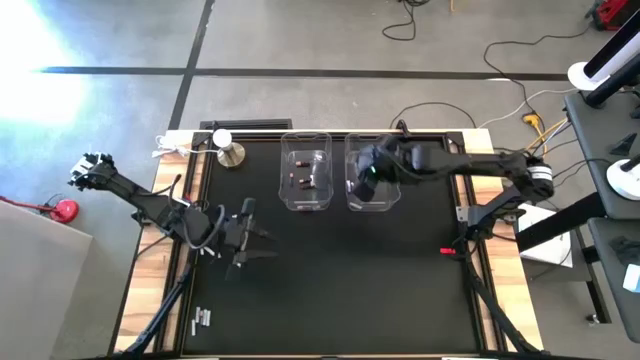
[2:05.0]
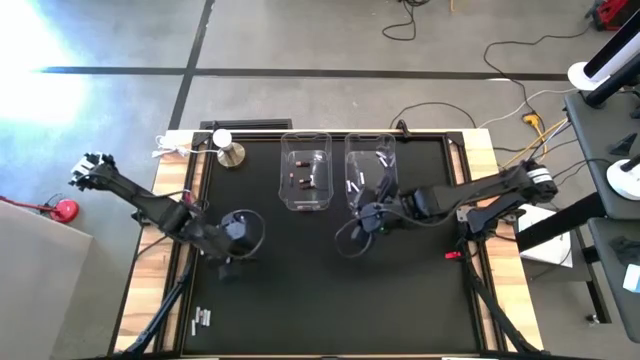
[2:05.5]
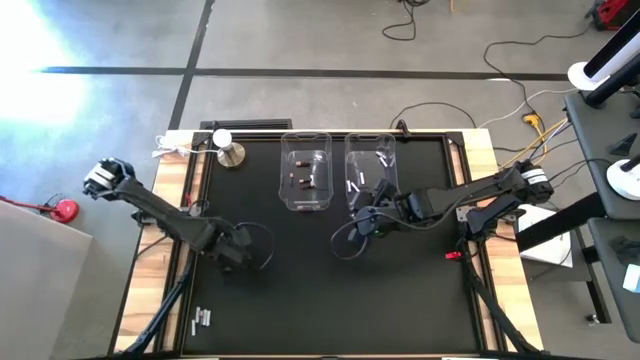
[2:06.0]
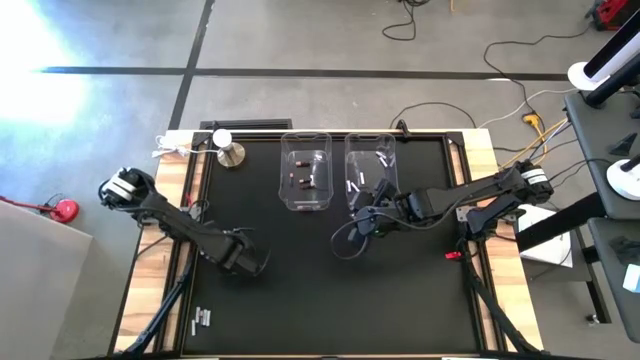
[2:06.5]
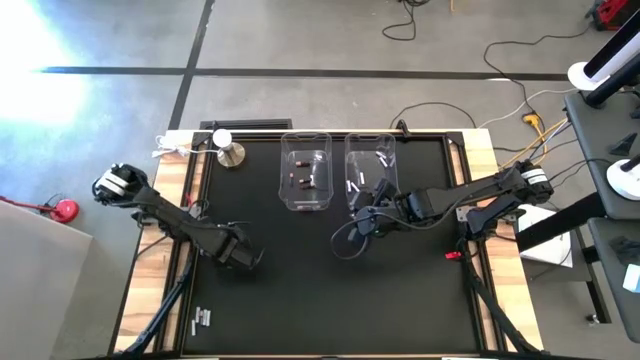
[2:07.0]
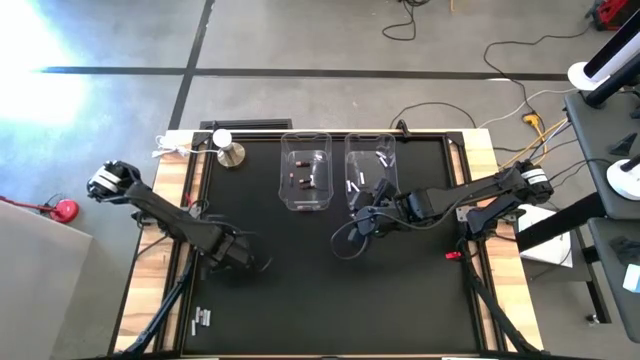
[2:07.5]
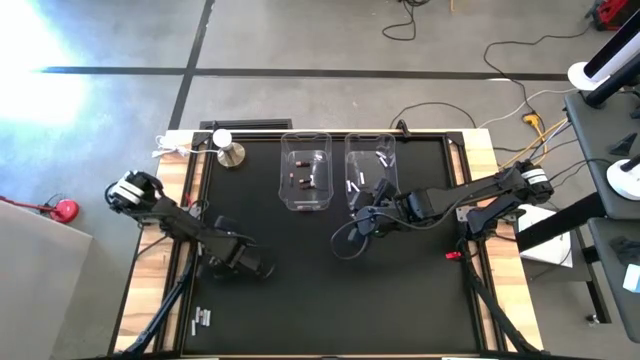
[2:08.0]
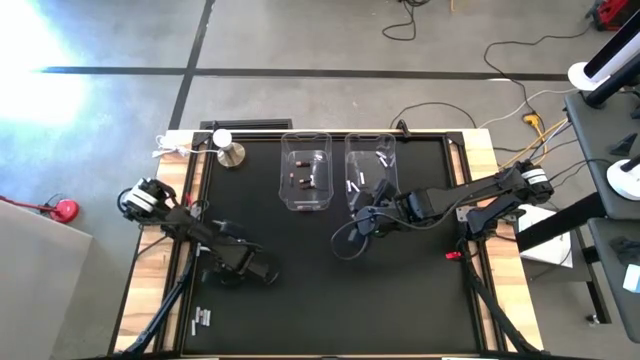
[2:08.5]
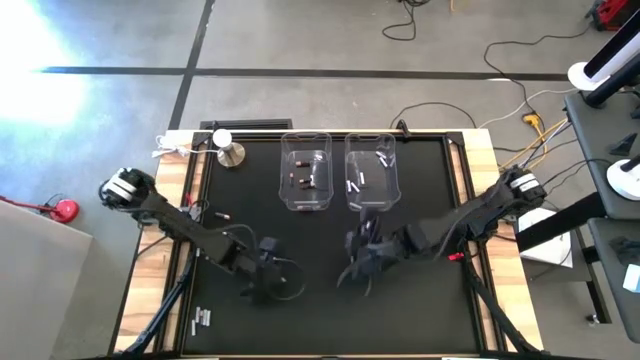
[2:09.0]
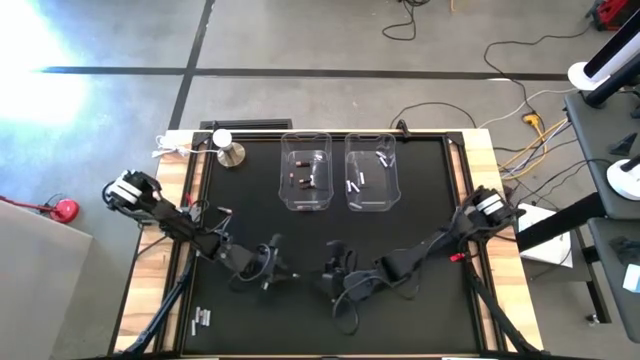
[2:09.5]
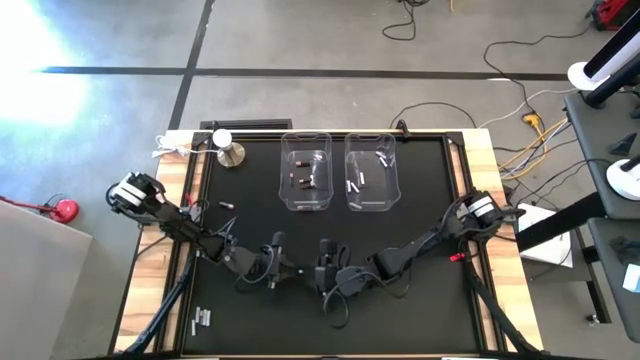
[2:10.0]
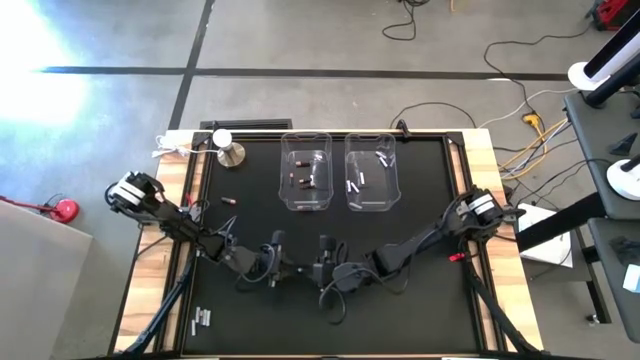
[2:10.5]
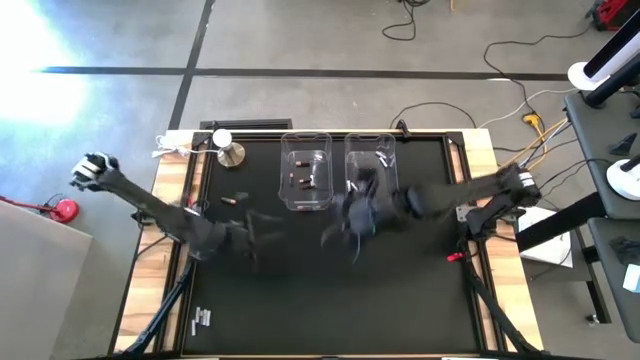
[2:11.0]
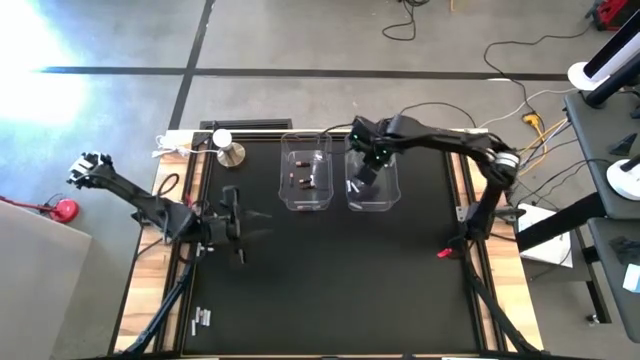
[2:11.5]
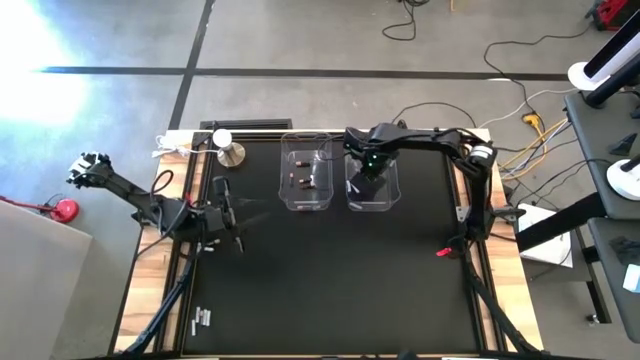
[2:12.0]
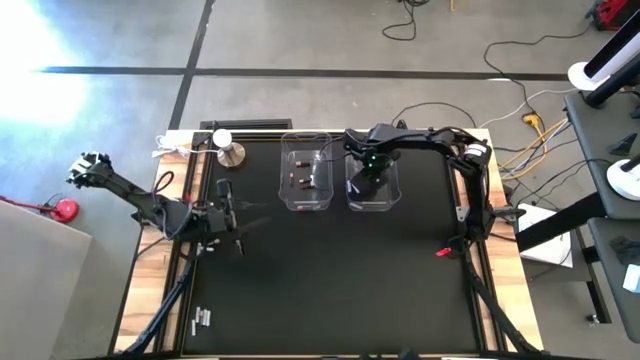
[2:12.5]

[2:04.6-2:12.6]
Task: Sort batteries
Put the white battery into the right transparent bin

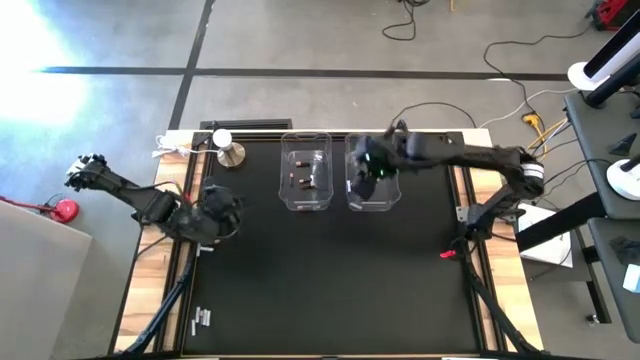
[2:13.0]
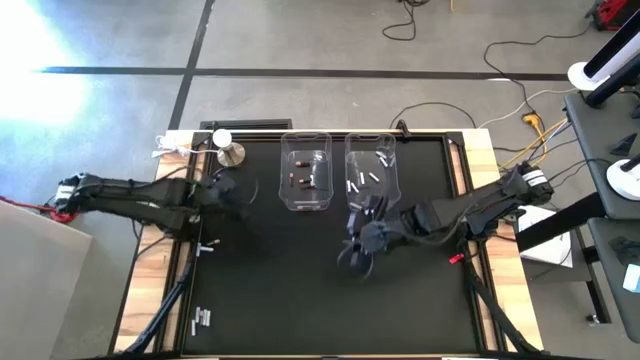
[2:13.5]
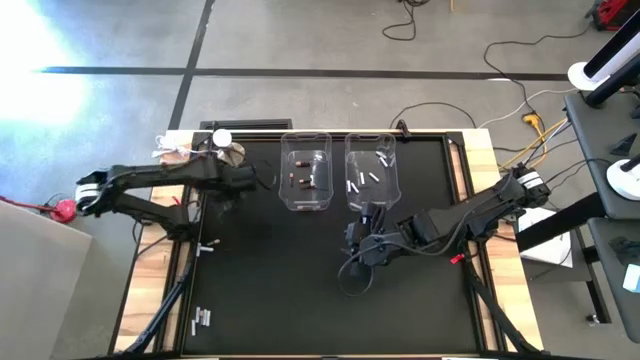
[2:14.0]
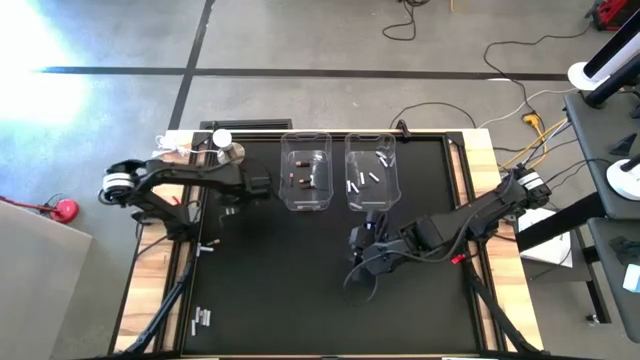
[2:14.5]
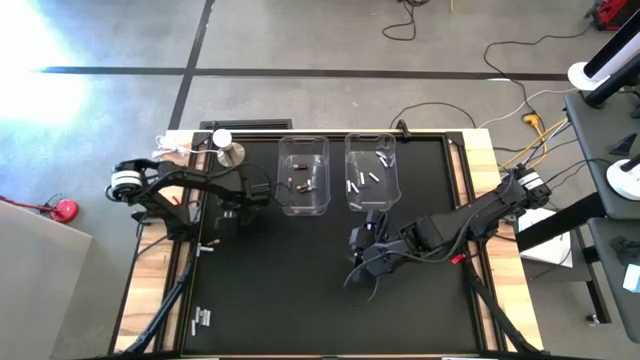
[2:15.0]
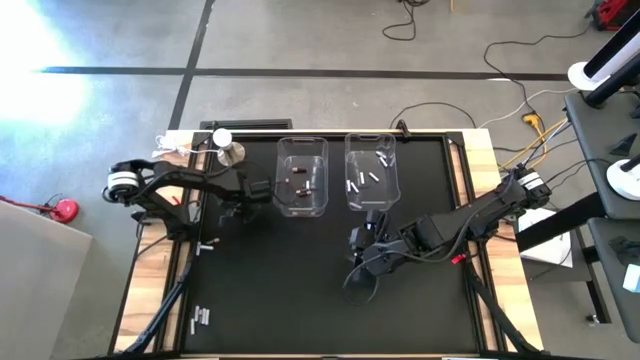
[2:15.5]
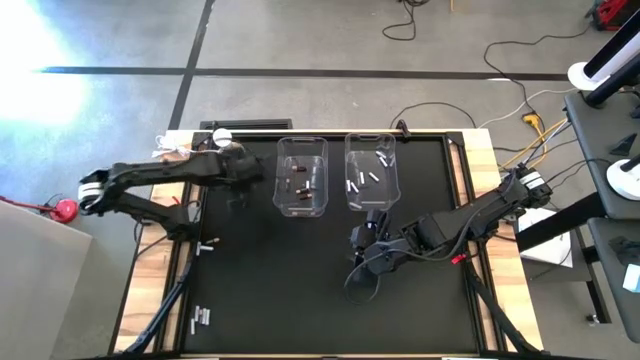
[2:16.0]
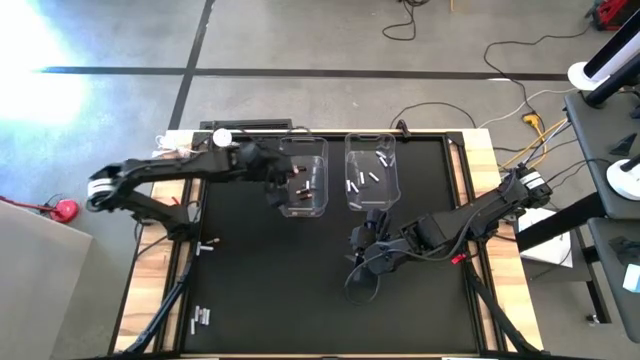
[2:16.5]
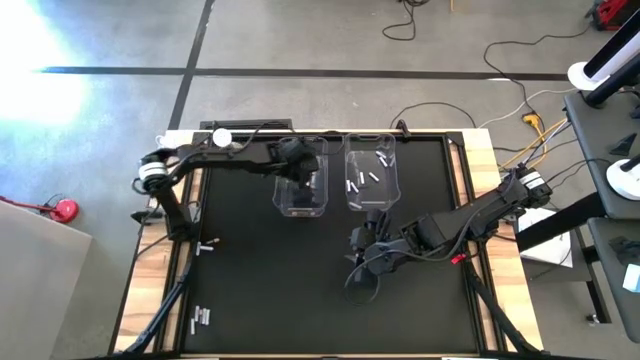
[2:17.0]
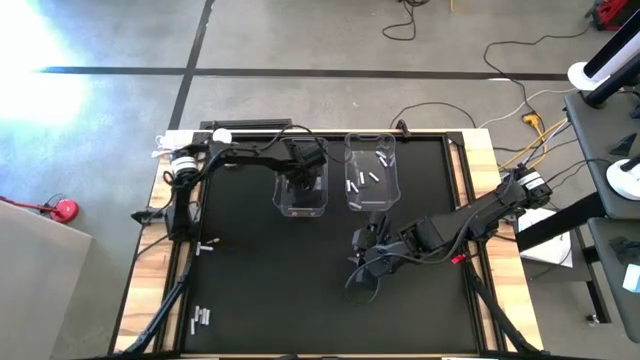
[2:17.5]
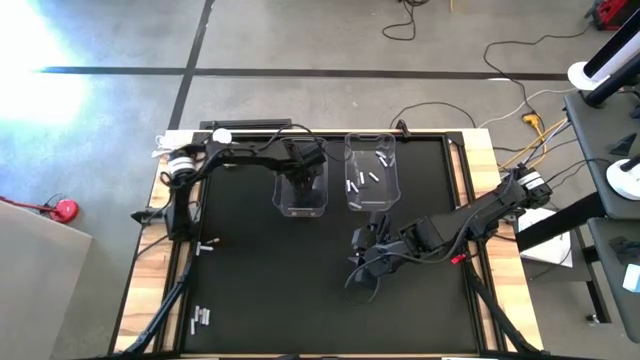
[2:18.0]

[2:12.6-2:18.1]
Put the black battery into the left transparent bin

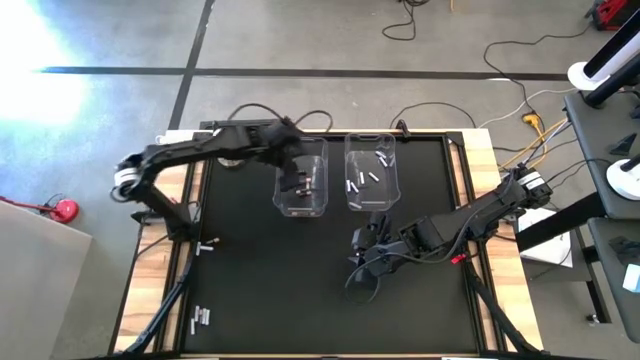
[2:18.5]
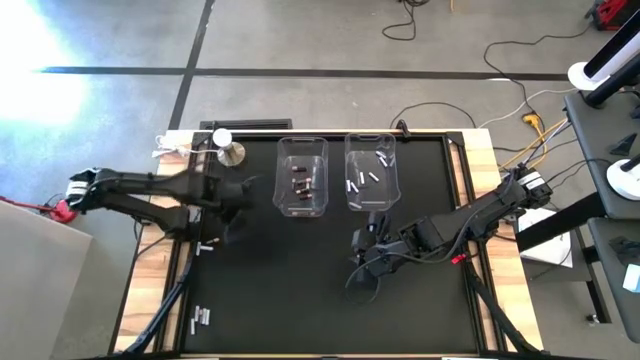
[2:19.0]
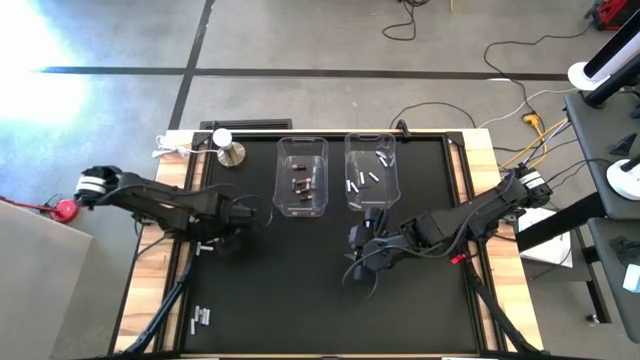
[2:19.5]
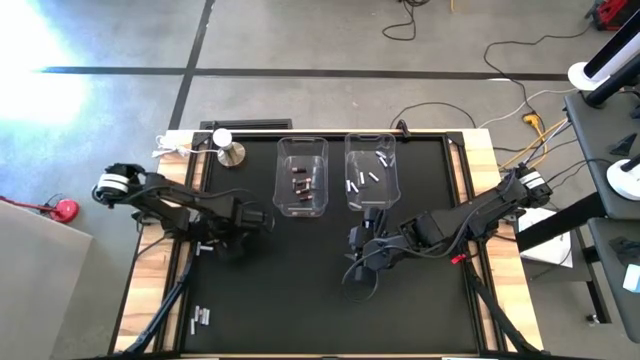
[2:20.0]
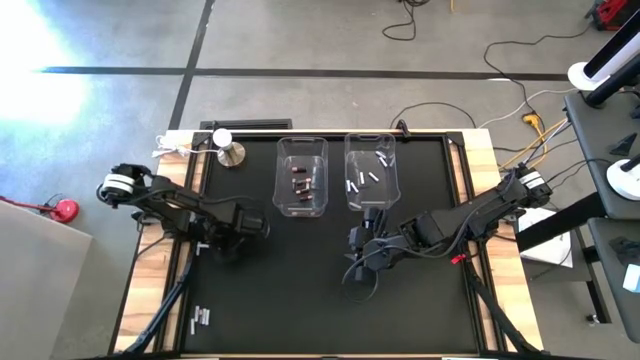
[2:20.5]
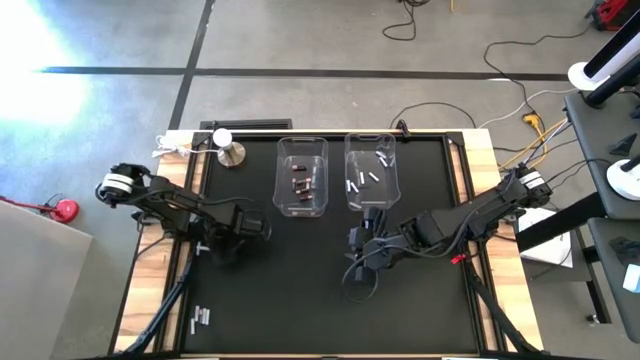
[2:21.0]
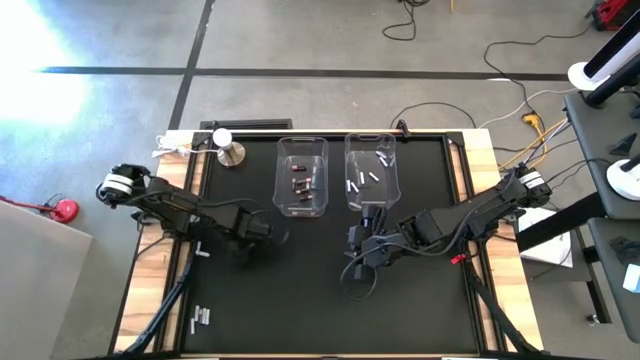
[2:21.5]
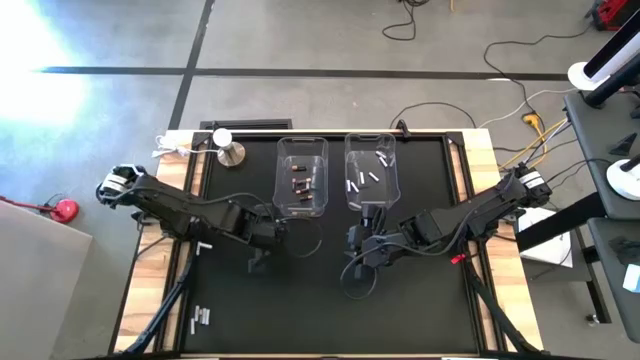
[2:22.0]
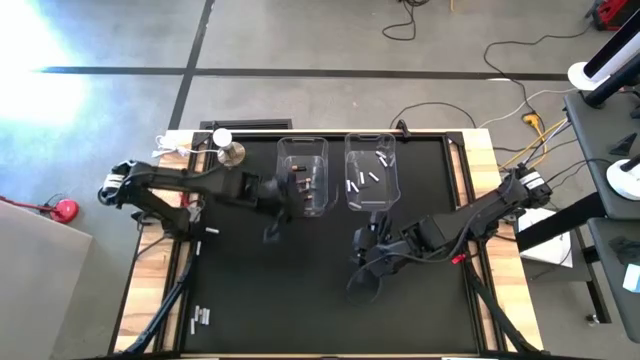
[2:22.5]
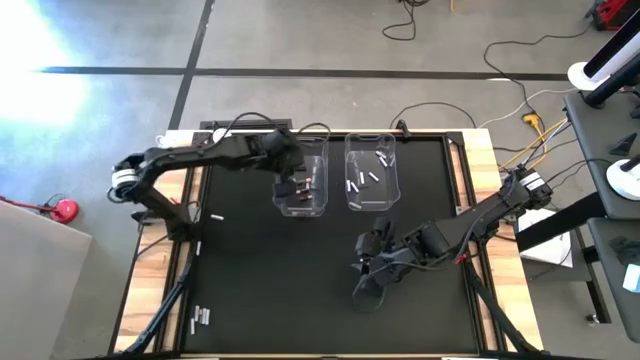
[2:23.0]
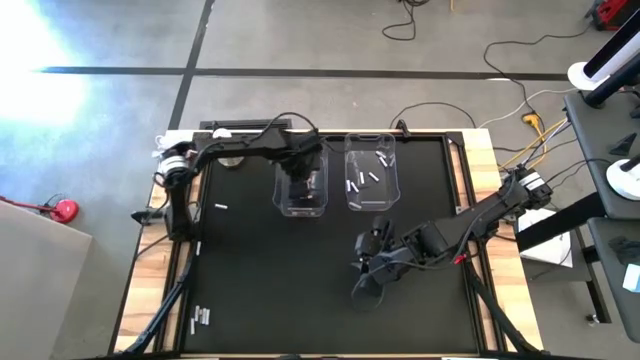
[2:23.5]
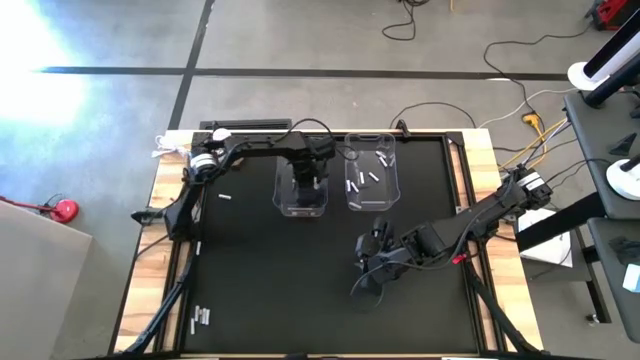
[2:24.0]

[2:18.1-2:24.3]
Put the black battery into the left transparent bin

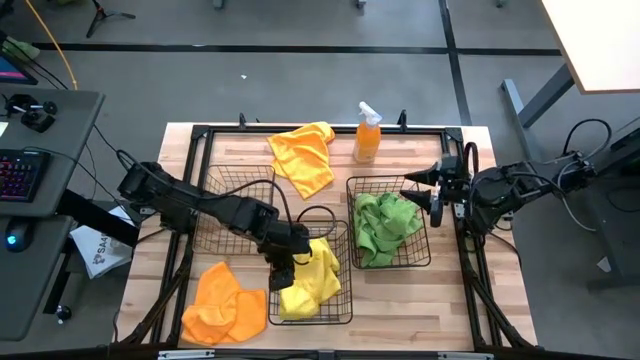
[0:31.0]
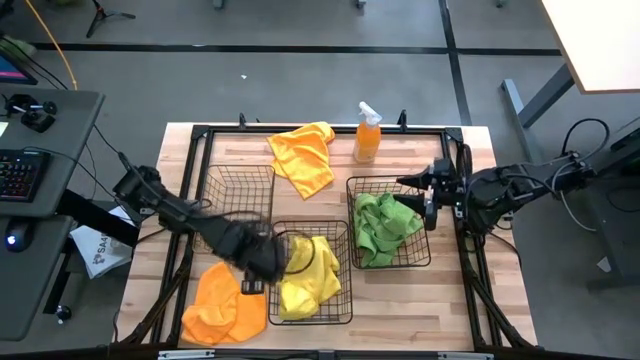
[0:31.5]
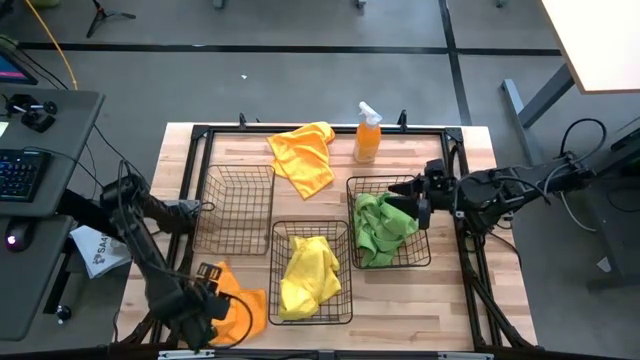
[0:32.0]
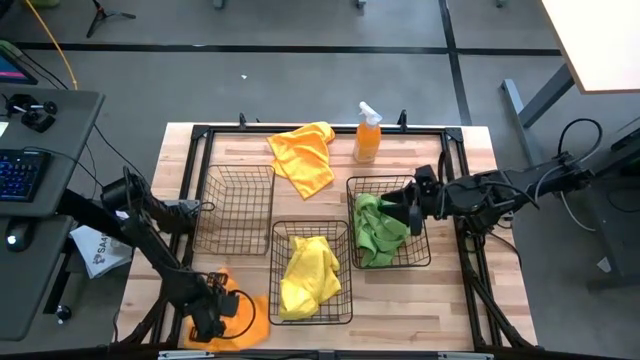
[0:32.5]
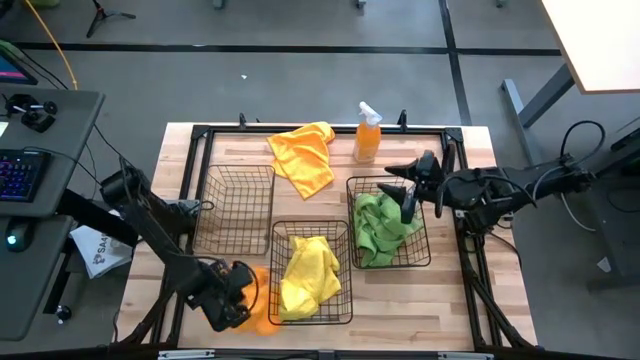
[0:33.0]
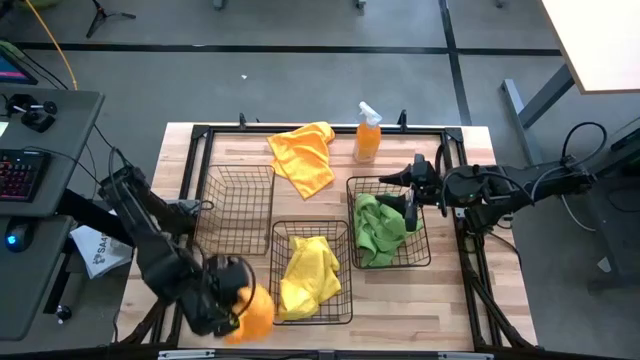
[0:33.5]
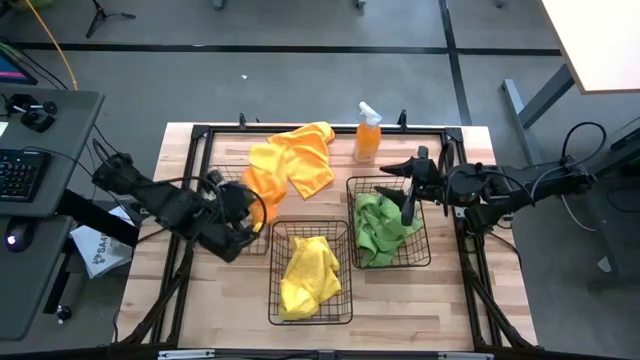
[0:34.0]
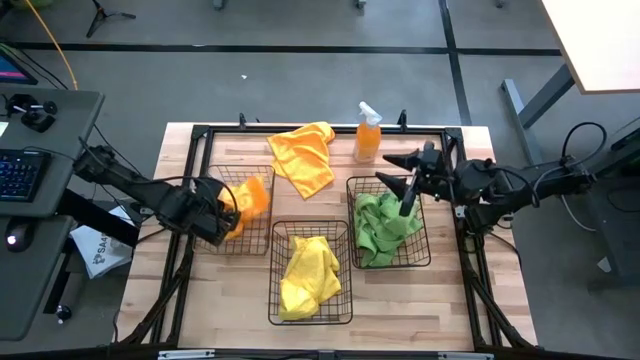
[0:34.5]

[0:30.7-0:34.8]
Task: Sort microfiber towel by color & place in baskets
Put the bottom orange microfiber cloth into the left basket
